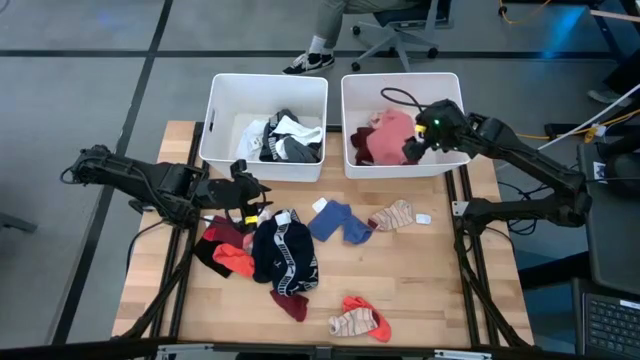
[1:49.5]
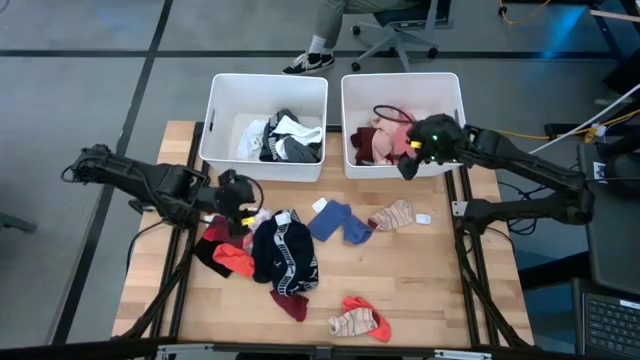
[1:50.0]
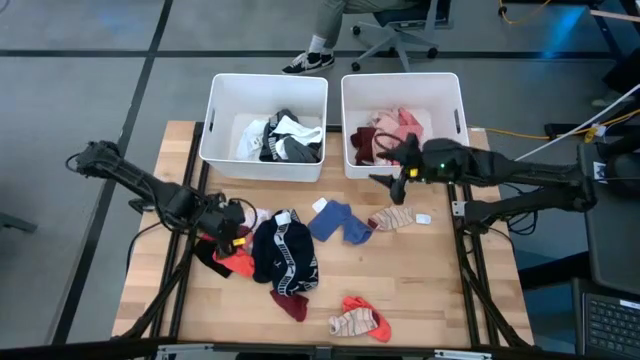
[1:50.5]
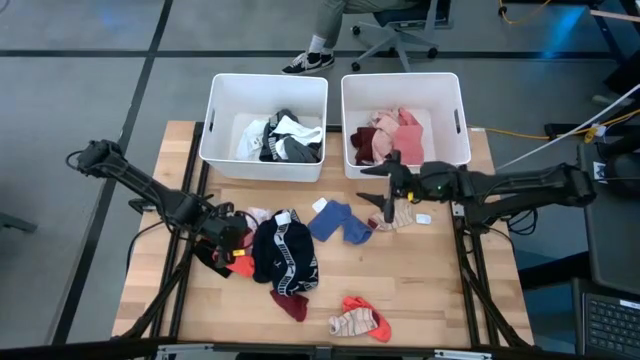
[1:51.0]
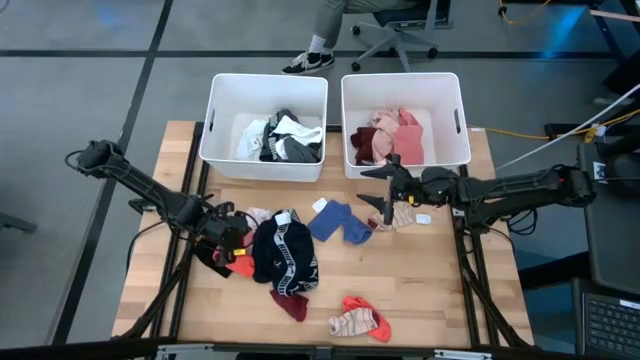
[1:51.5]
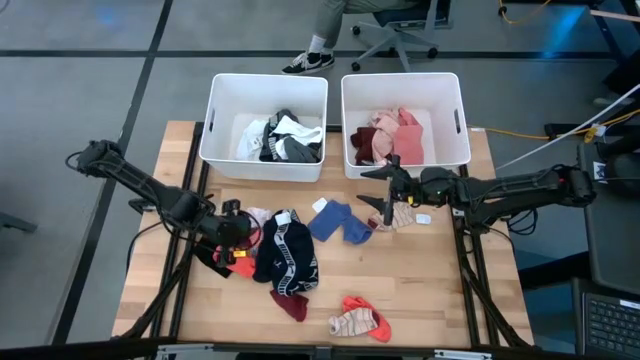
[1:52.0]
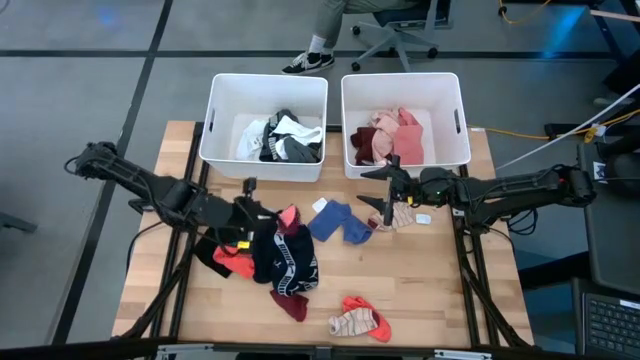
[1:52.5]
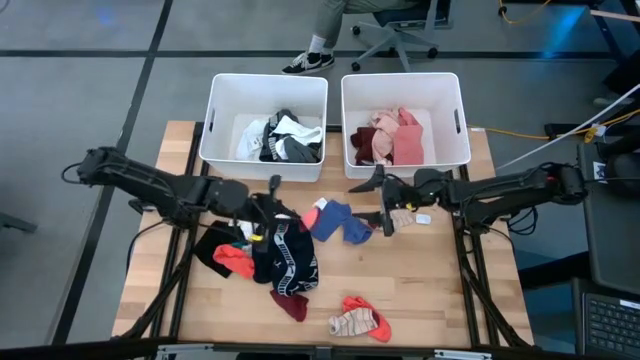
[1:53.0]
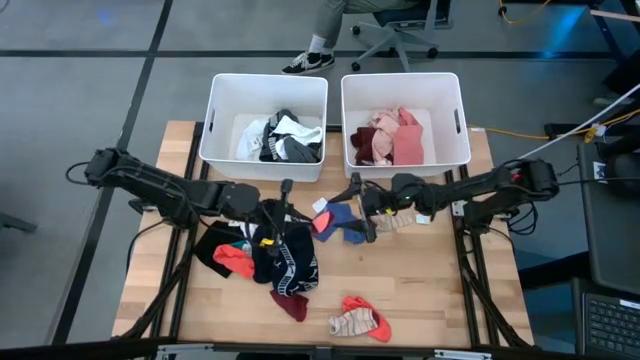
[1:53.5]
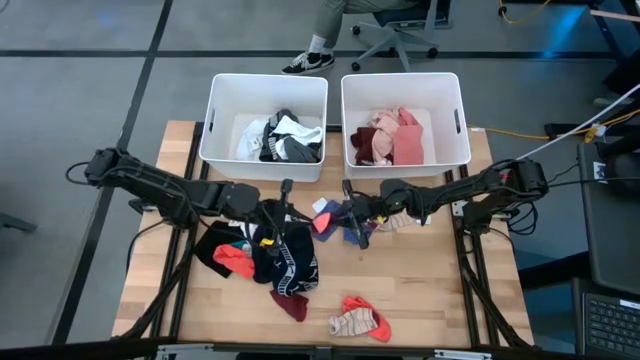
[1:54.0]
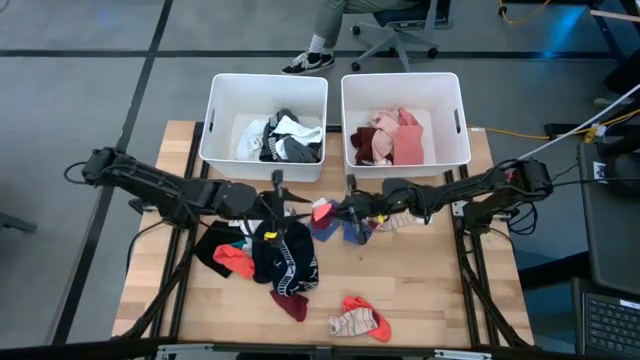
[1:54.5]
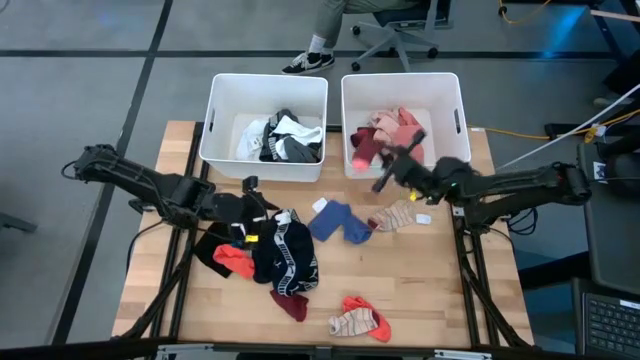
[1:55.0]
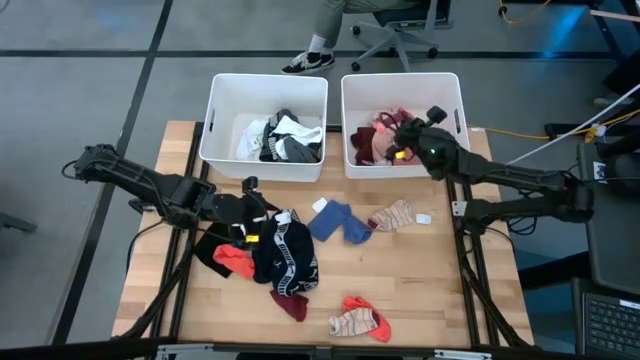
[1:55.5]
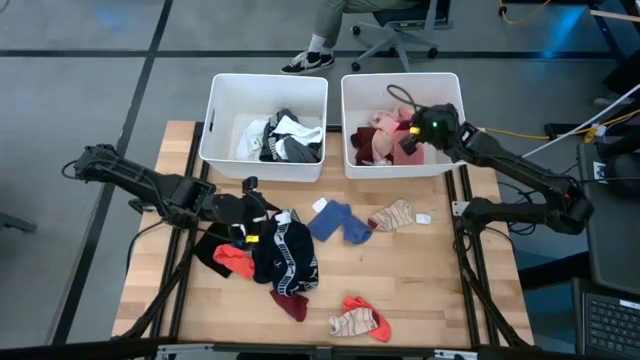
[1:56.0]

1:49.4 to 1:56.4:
Task: Sort clothes
Put the top maroon sock into the right white laundry bin

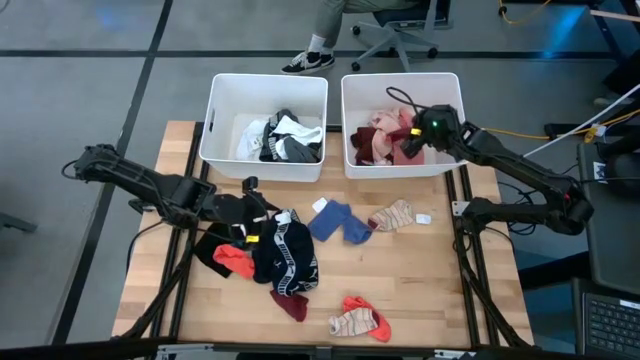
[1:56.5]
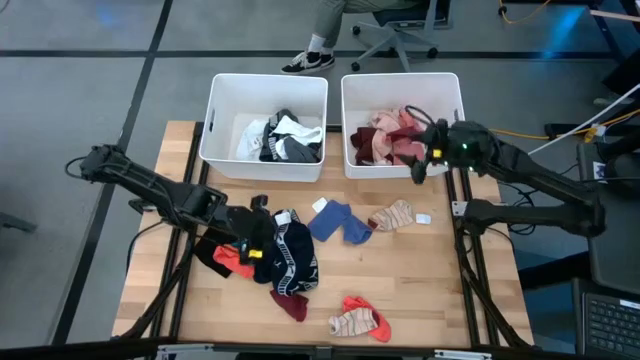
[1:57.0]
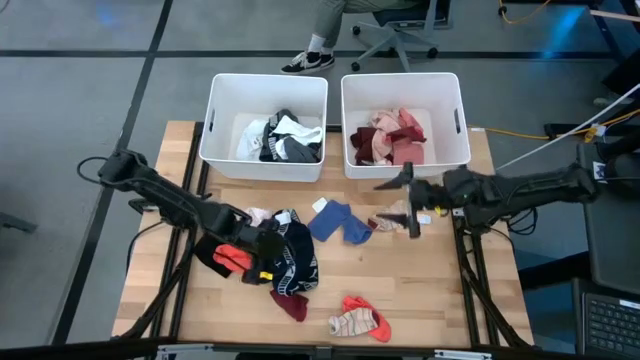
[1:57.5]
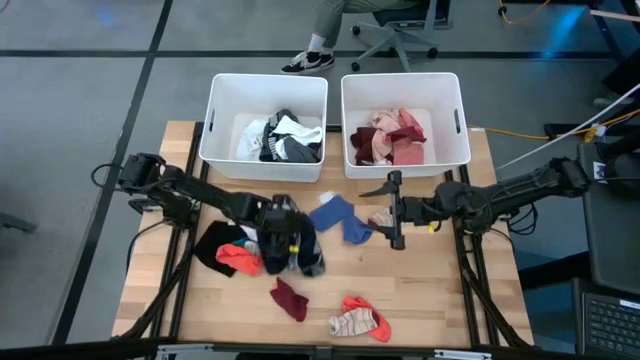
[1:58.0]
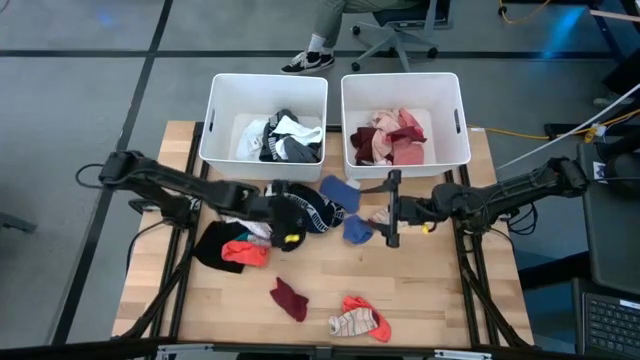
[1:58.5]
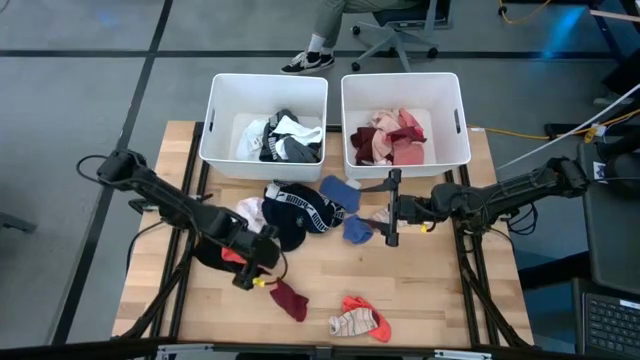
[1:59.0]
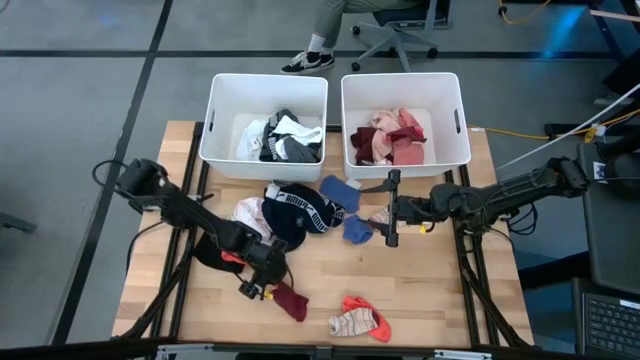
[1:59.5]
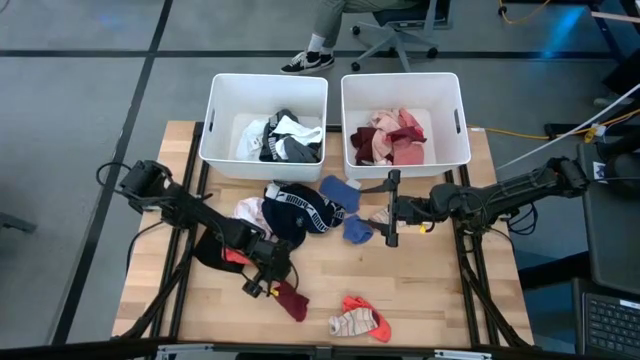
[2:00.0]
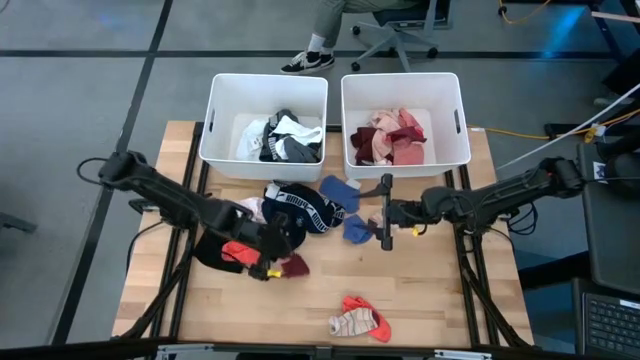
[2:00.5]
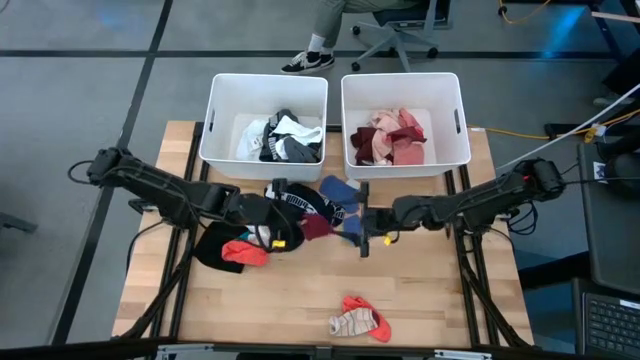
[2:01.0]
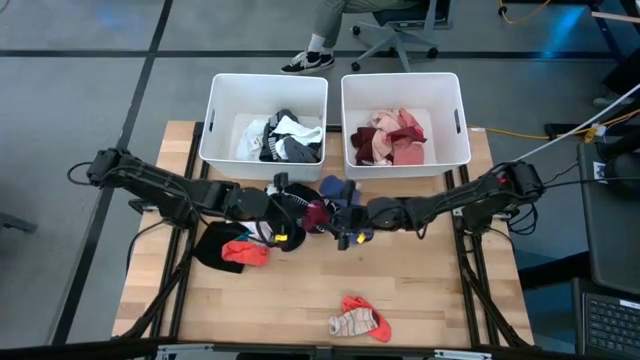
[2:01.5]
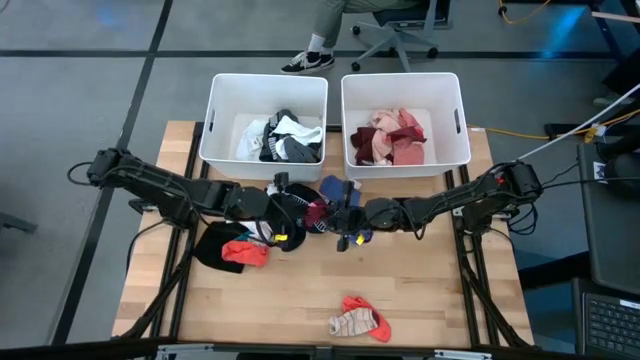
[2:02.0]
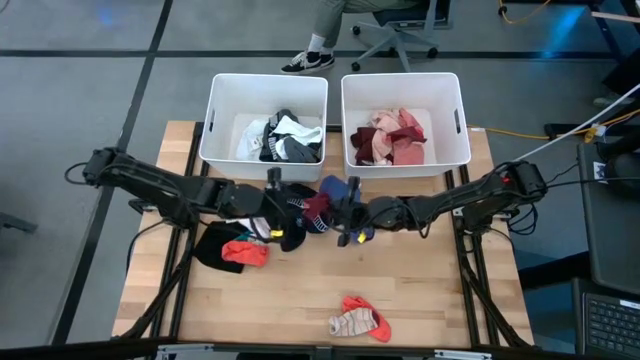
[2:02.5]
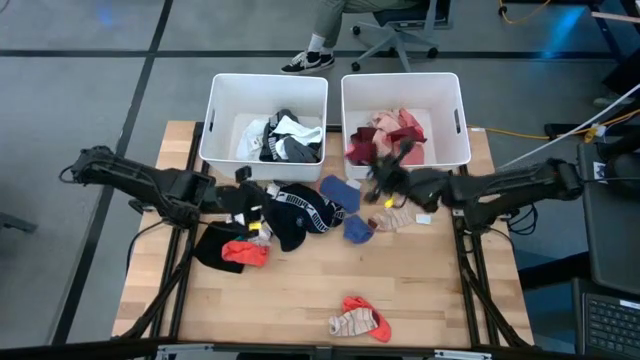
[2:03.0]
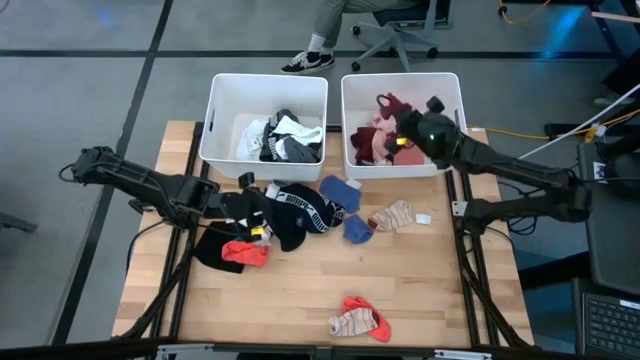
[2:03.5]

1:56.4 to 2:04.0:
Put the maroon sock into the right white laundry bin

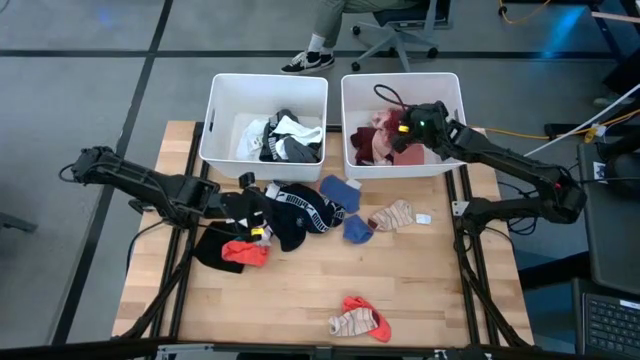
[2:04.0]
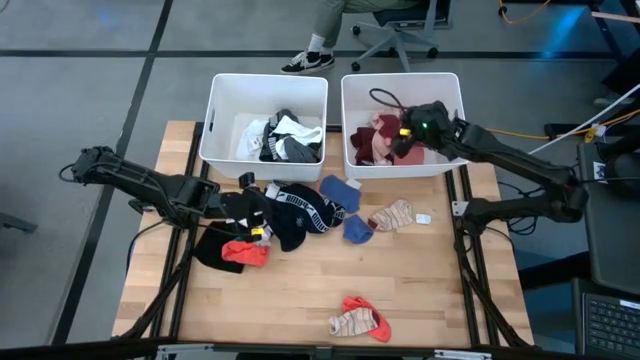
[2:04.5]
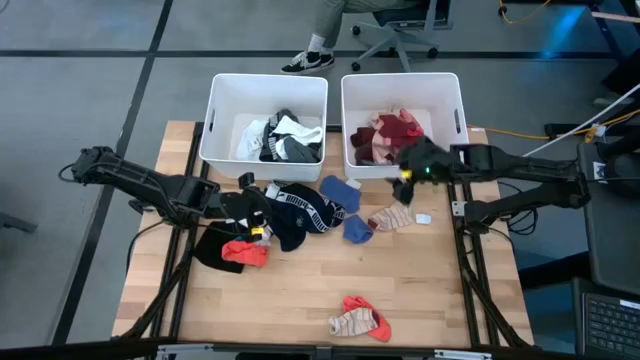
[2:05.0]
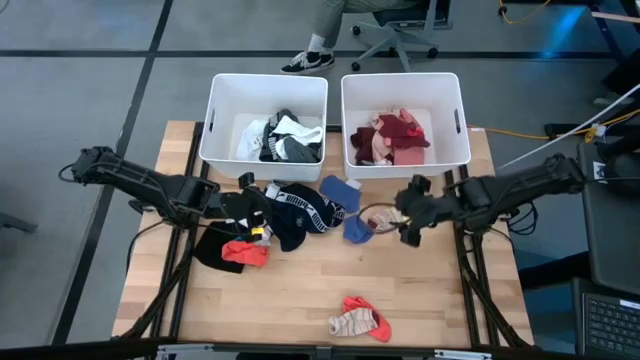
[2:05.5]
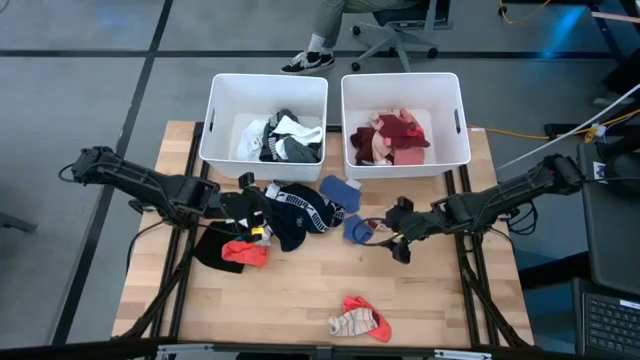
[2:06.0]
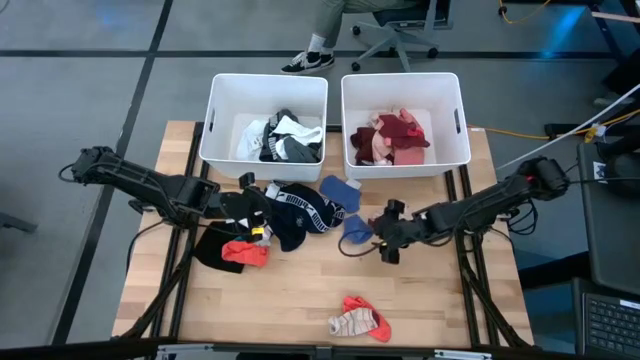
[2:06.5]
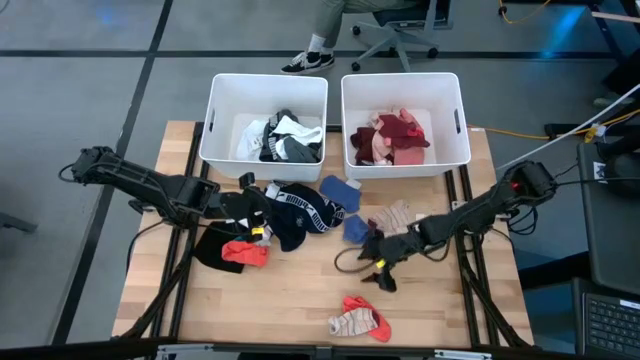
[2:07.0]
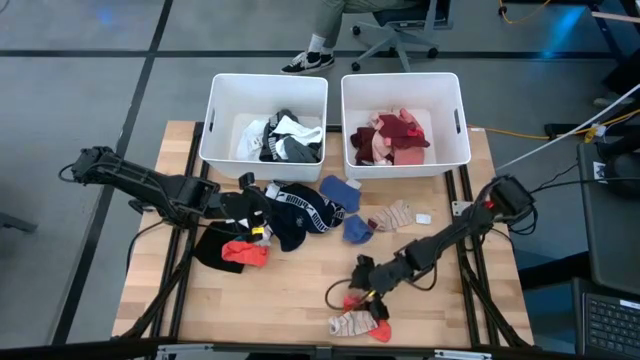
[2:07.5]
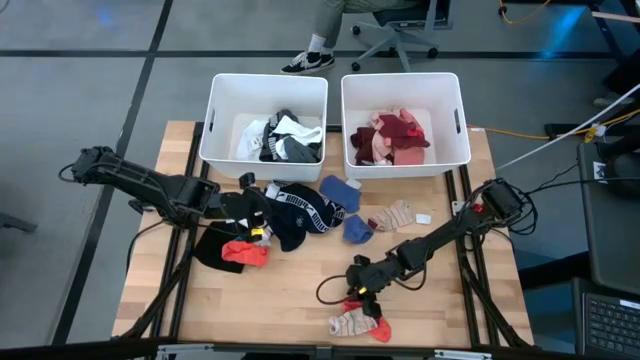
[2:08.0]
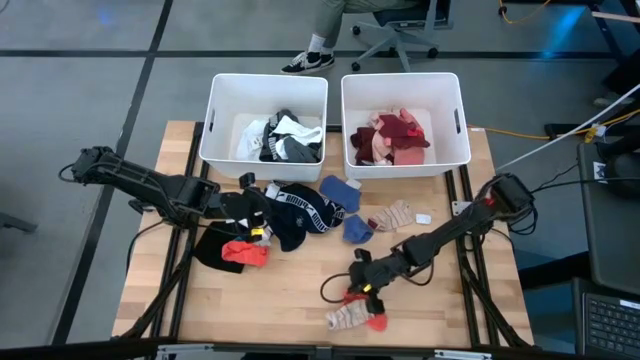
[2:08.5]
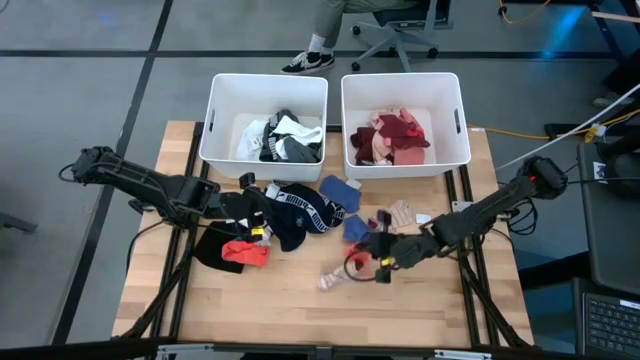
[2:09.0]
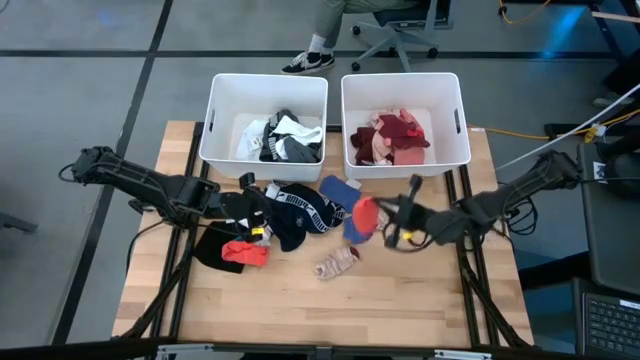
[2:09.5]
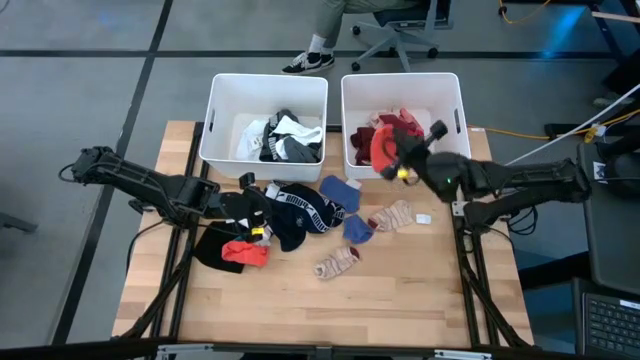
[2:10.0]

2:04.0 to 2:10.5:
Put the bottom orange sock into the right white laundry bin
